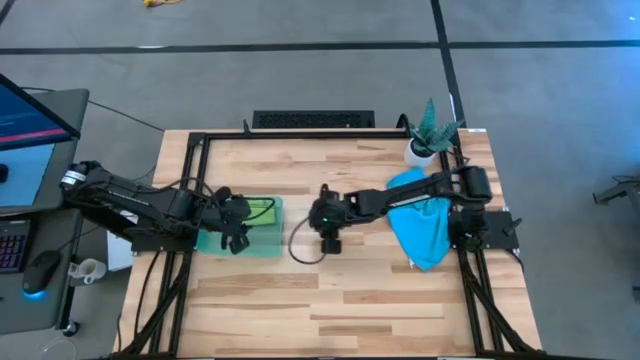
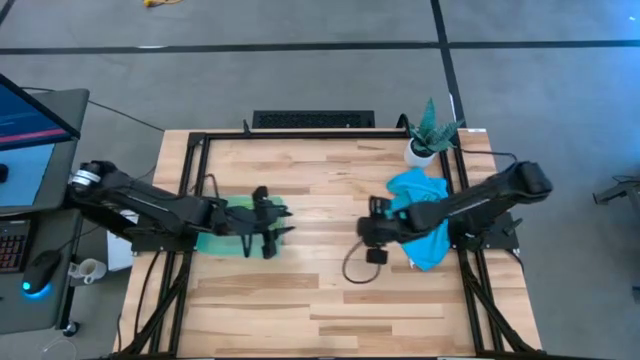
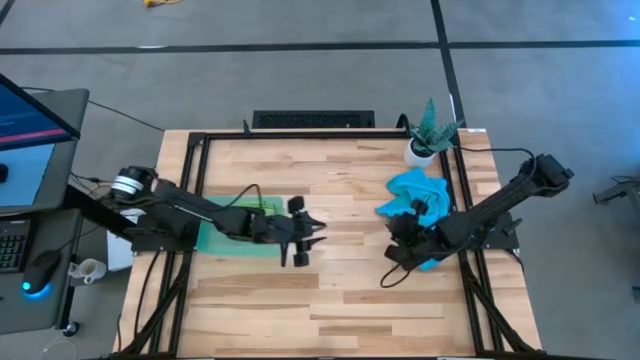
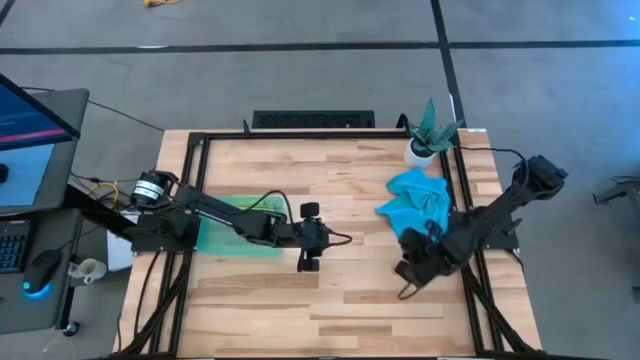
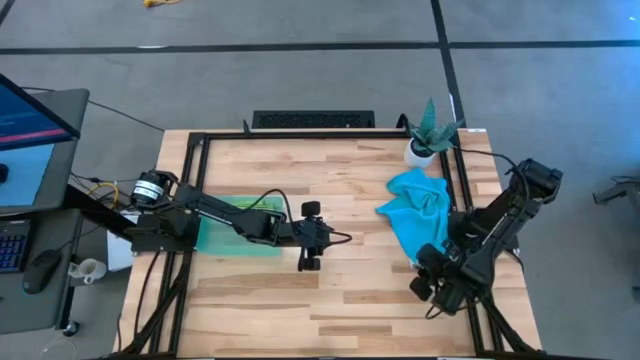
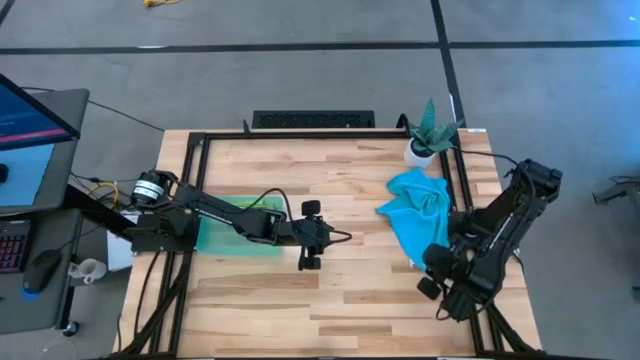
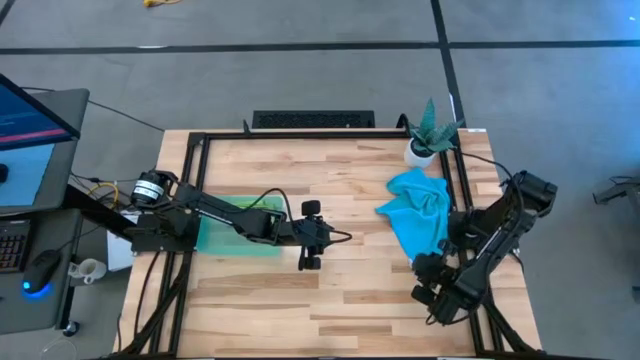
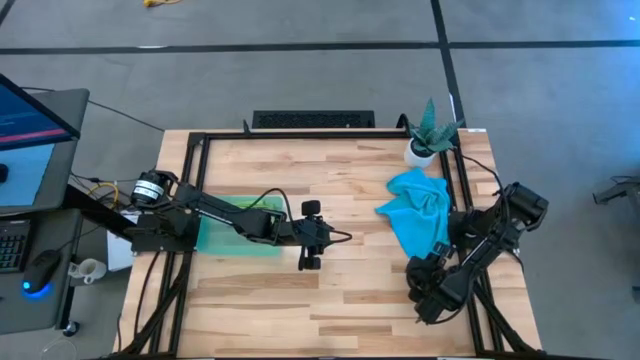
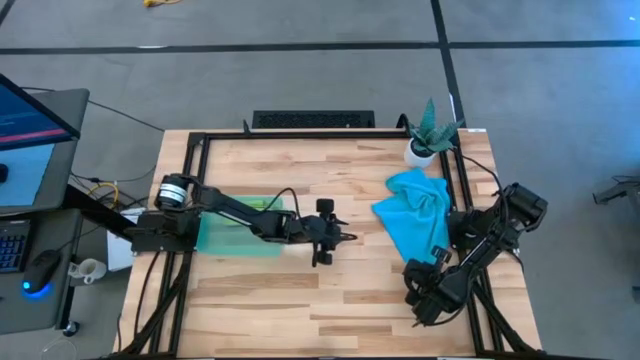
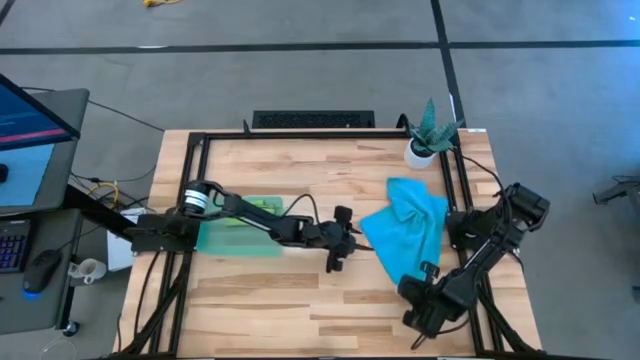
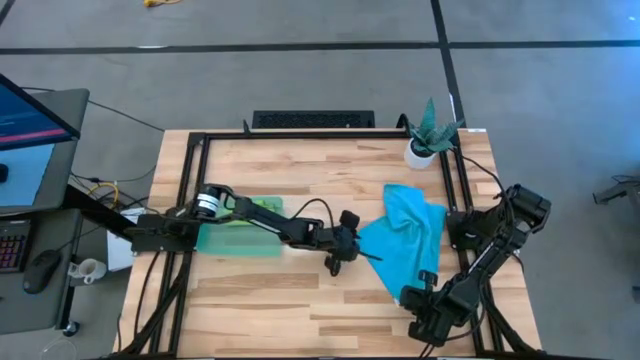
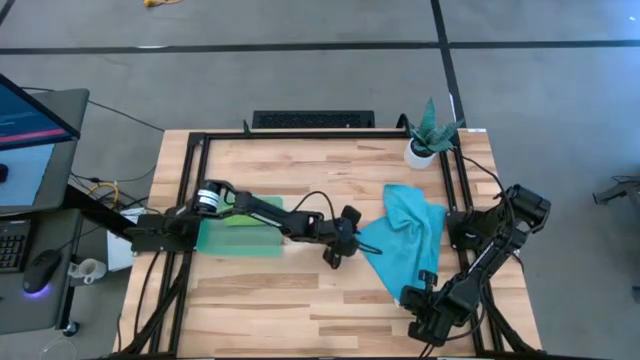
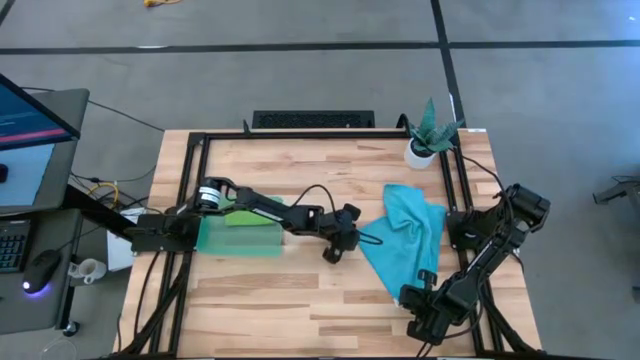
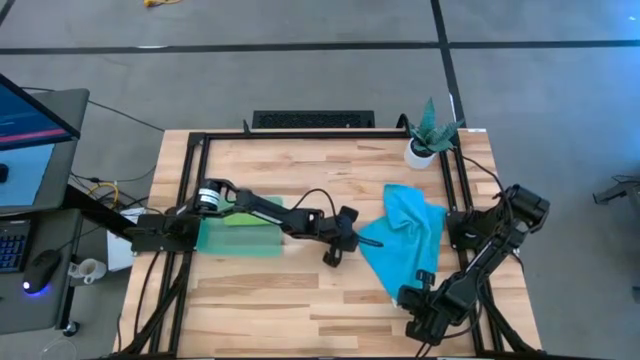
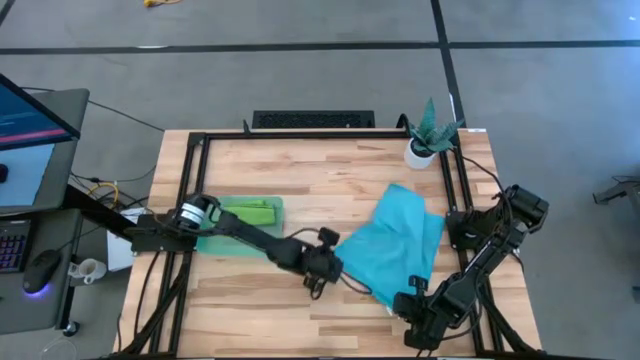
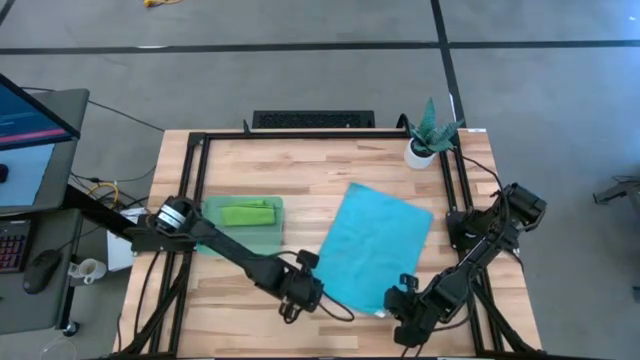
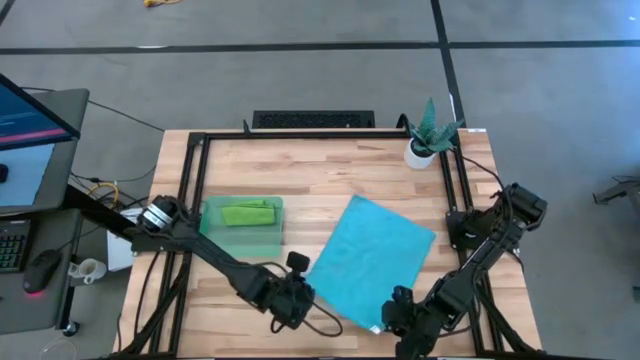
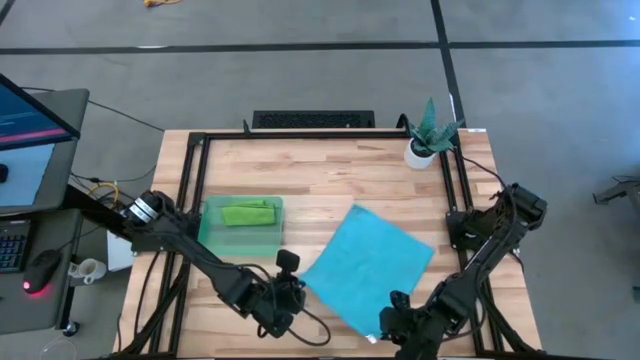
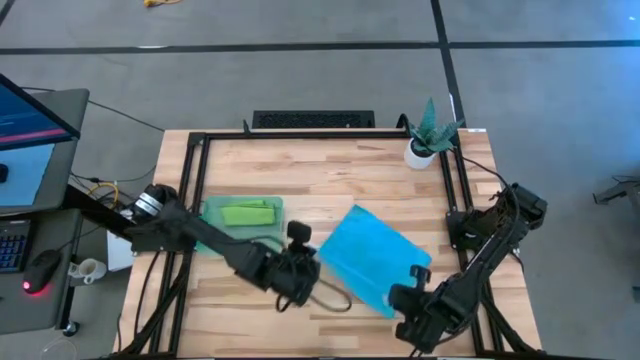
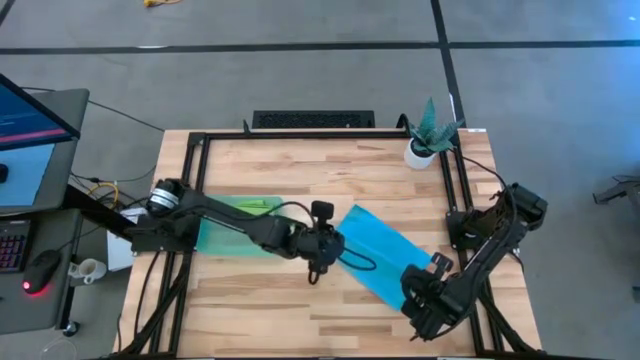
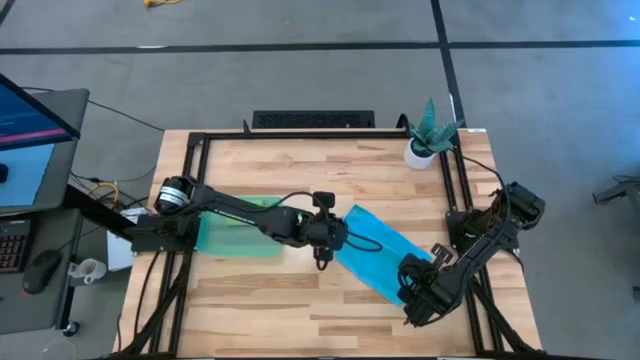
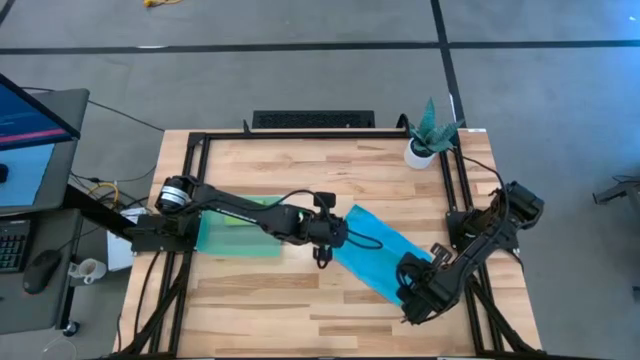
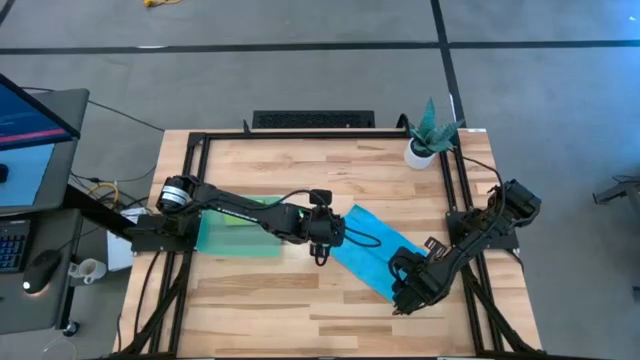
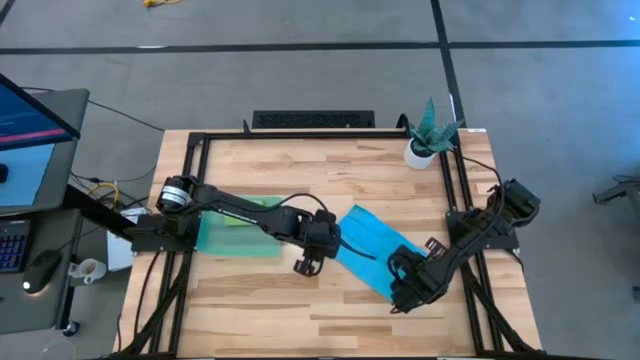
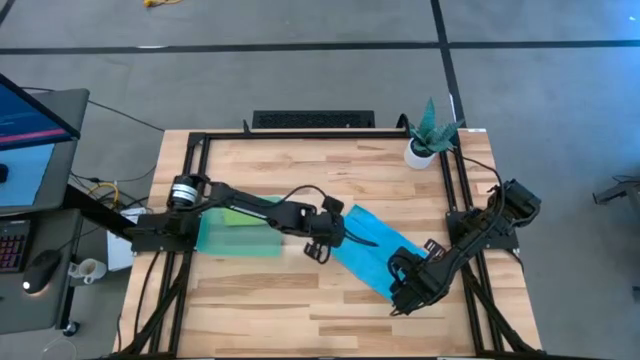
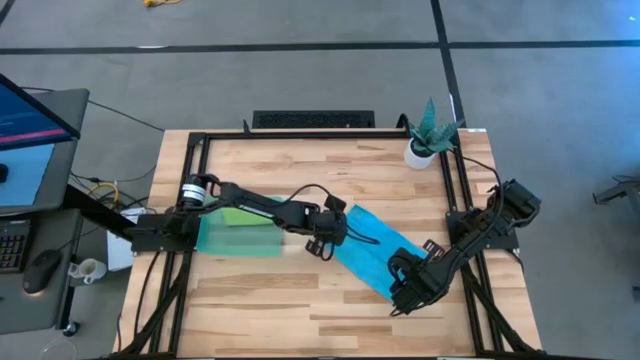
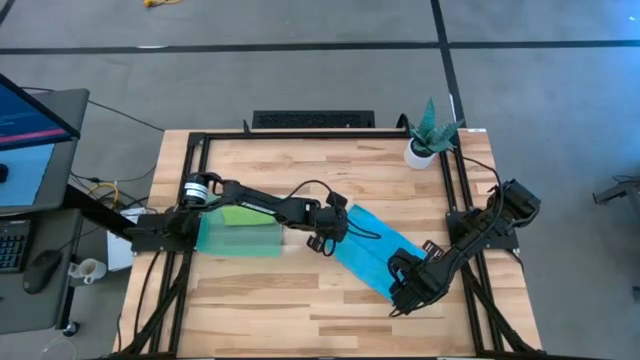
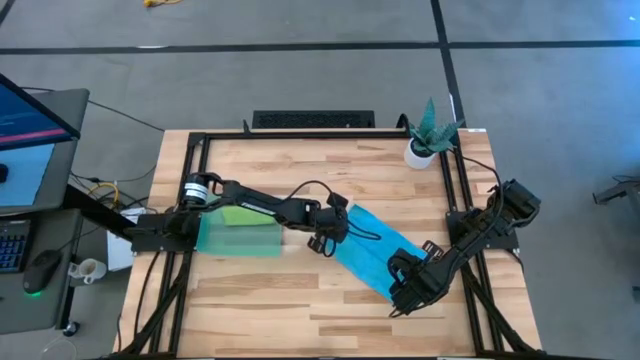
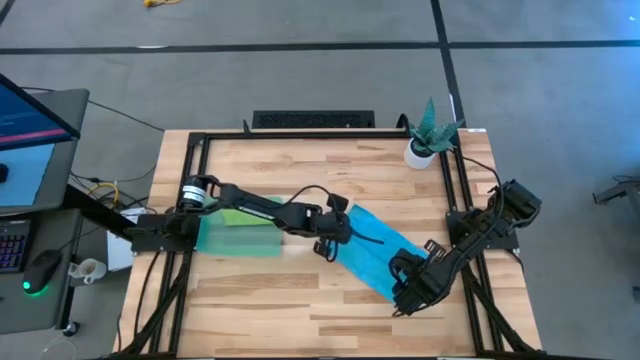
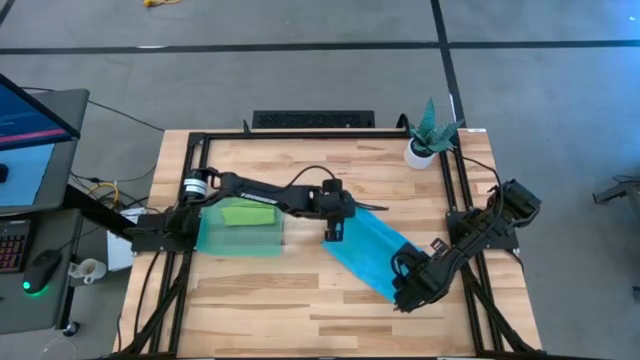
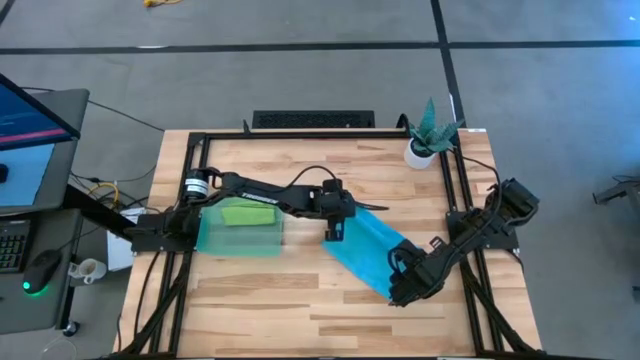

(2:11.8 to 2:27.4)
Task: Roll microfiber towels into tight, uniform cylinder then place into a basket
Fold the blue towel

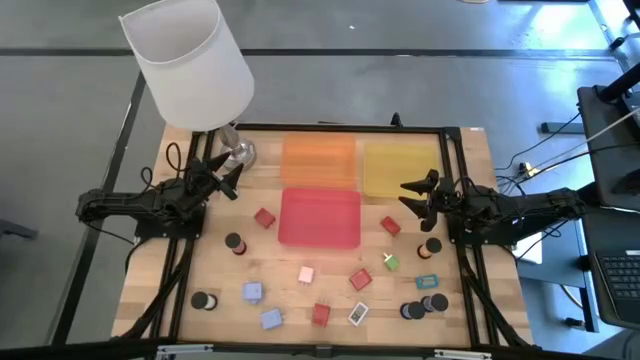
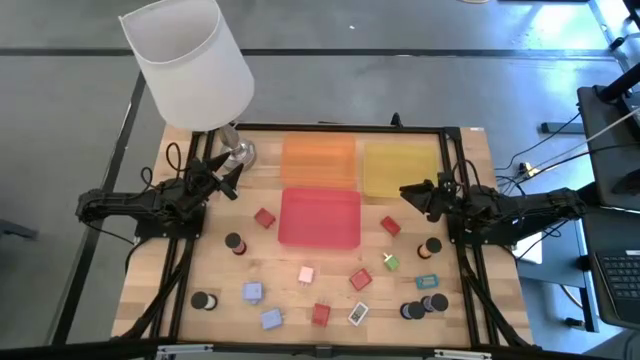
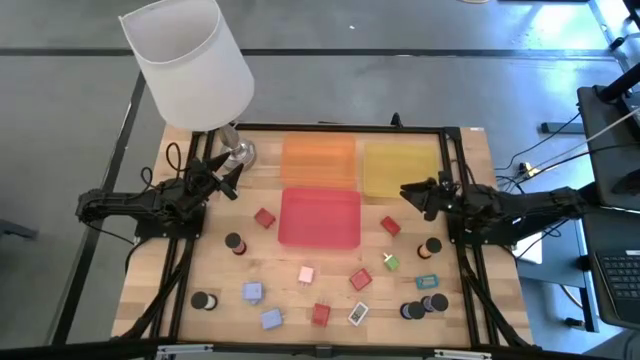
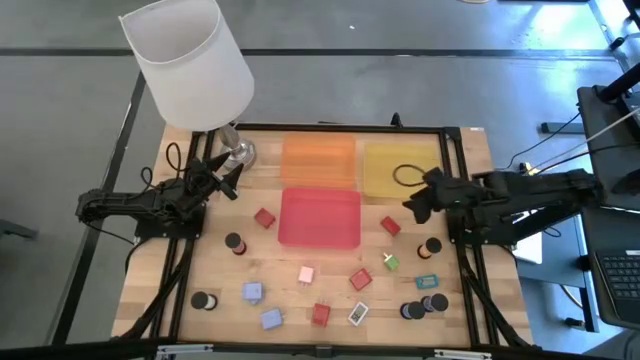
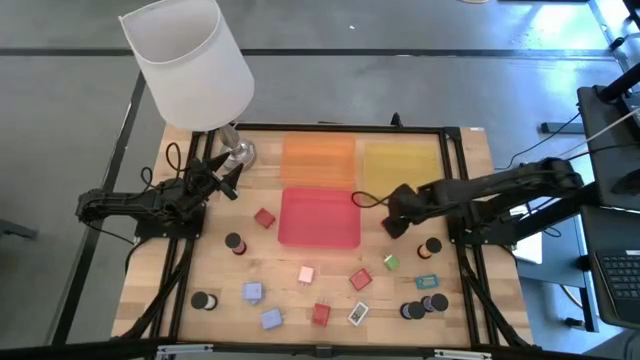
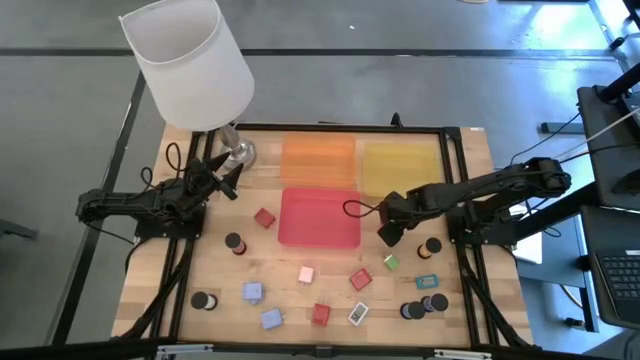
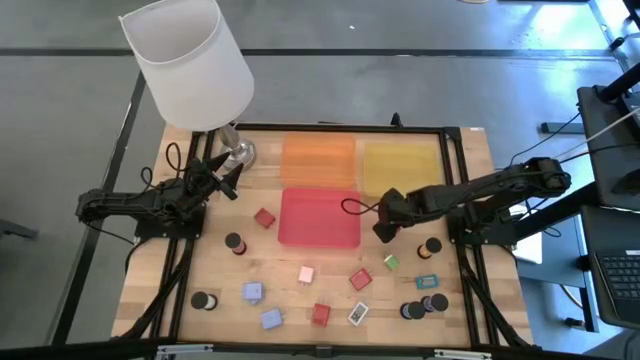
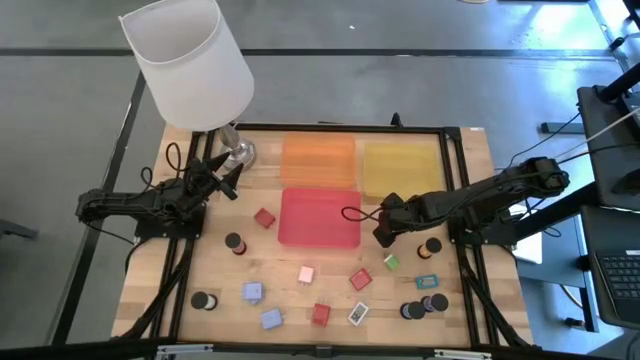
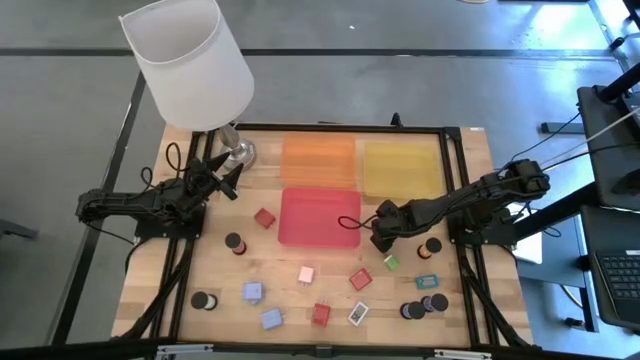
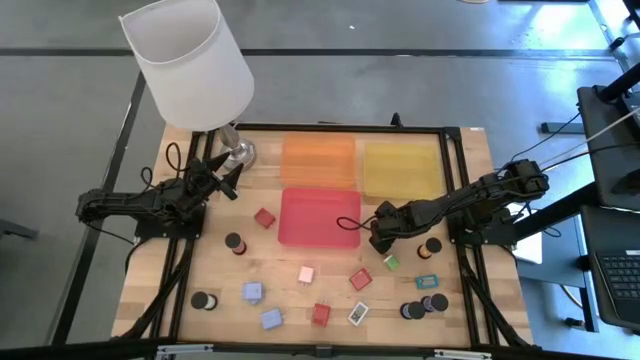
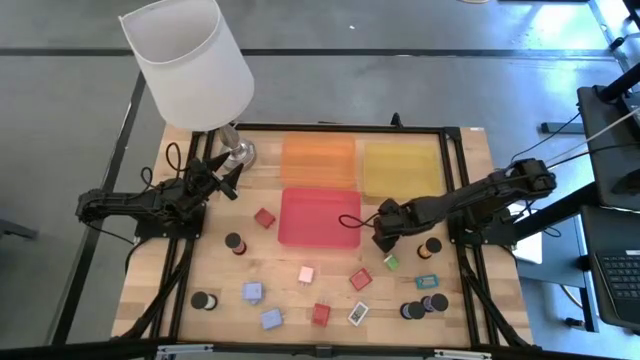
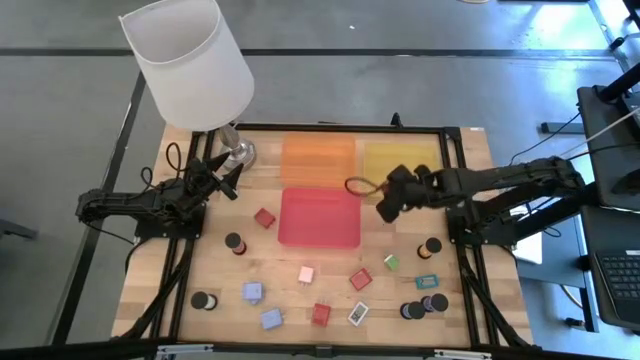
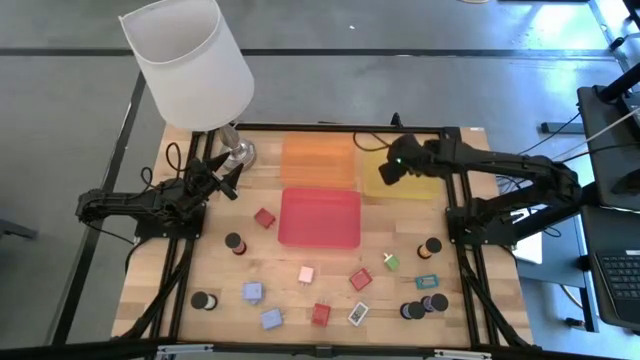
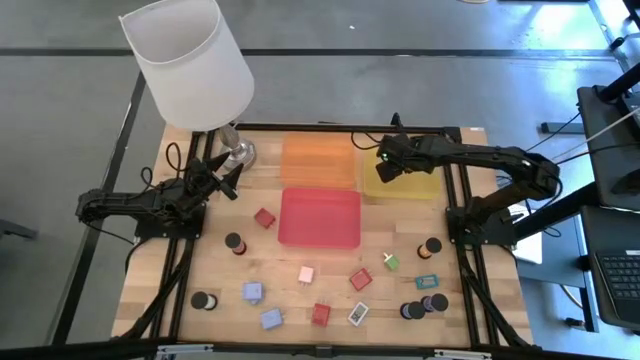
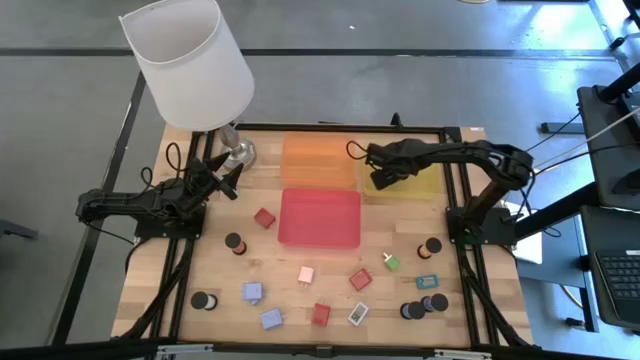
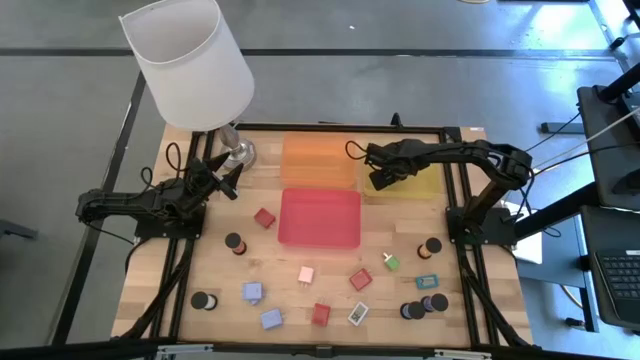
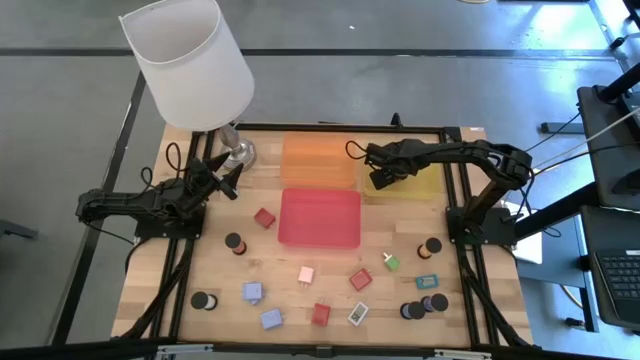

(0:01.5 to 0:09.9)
Task: Pick & Place Office items
Put the red digital clock into the yellow bin
